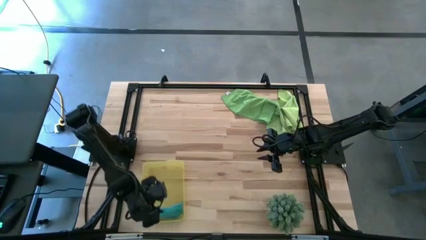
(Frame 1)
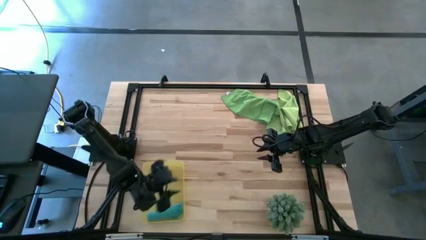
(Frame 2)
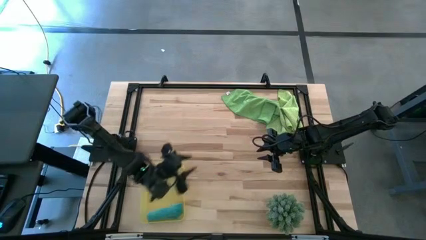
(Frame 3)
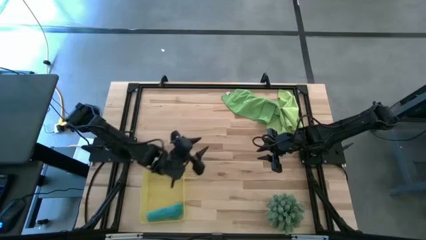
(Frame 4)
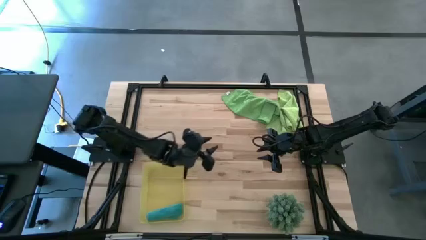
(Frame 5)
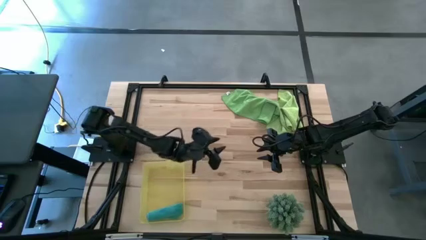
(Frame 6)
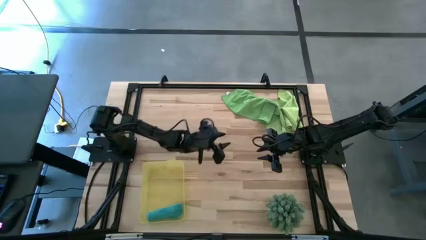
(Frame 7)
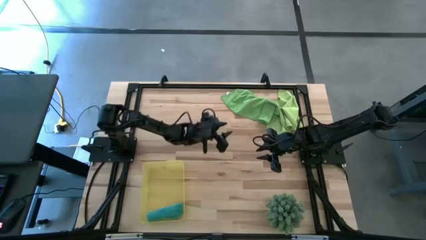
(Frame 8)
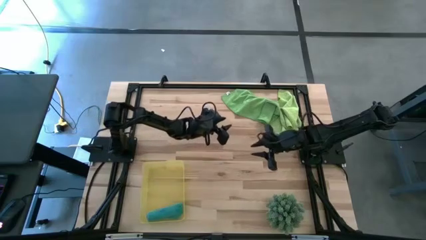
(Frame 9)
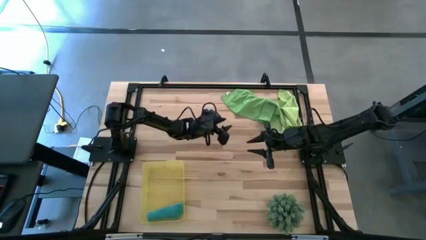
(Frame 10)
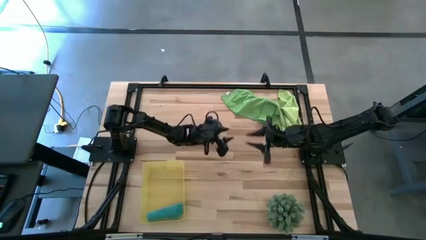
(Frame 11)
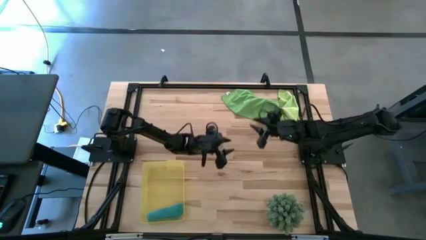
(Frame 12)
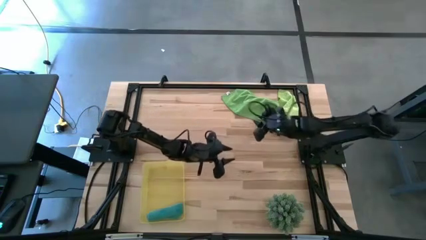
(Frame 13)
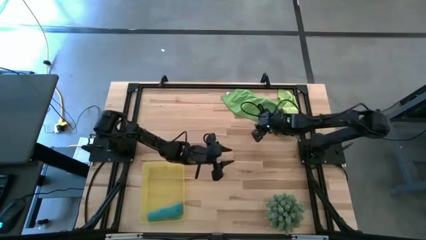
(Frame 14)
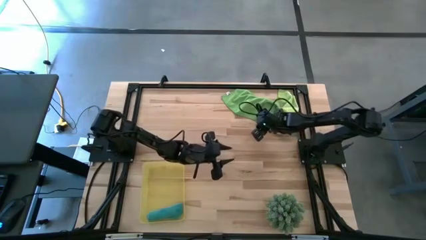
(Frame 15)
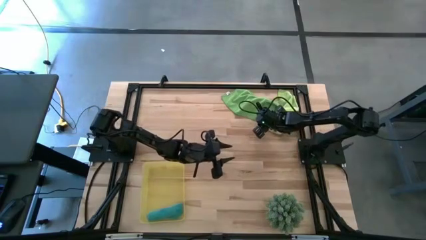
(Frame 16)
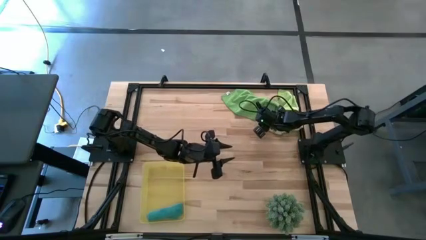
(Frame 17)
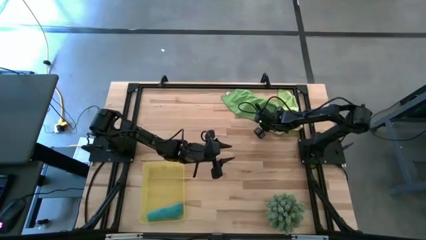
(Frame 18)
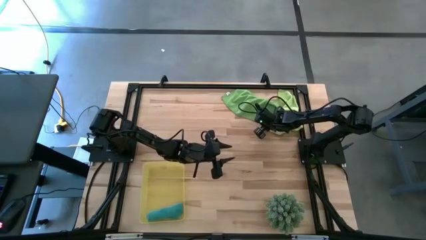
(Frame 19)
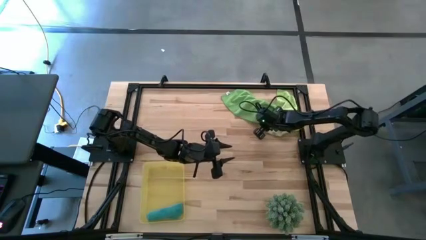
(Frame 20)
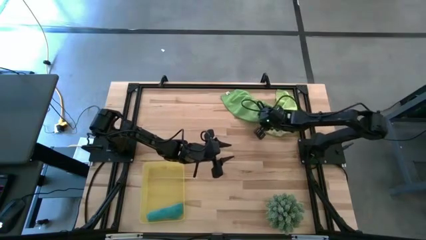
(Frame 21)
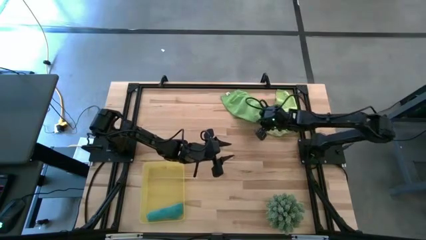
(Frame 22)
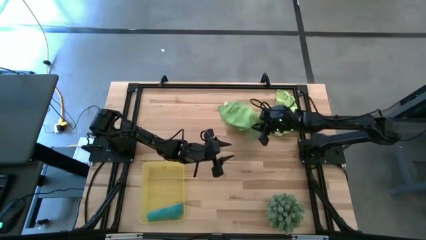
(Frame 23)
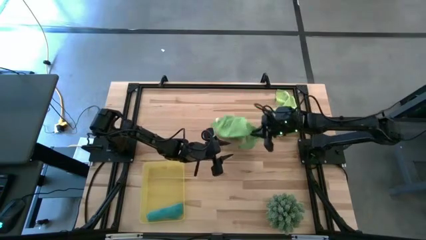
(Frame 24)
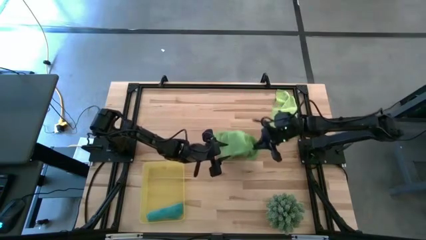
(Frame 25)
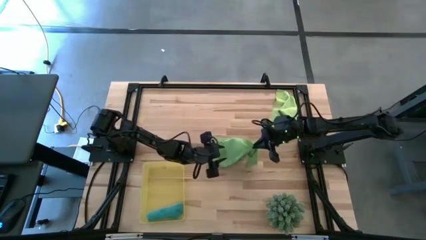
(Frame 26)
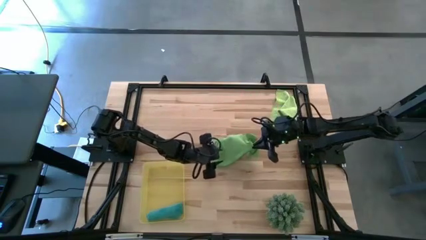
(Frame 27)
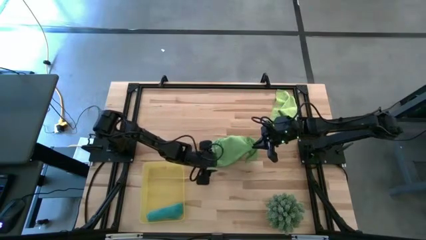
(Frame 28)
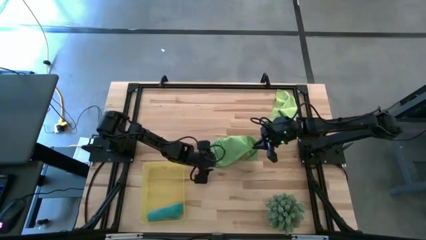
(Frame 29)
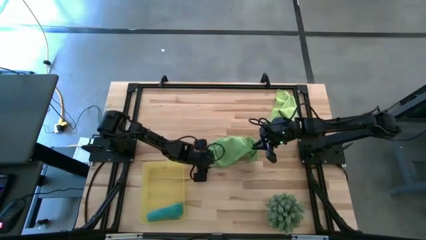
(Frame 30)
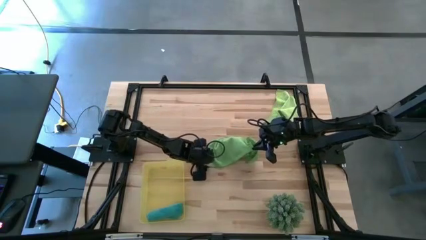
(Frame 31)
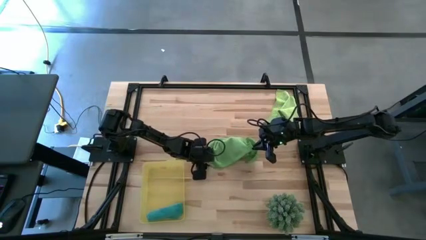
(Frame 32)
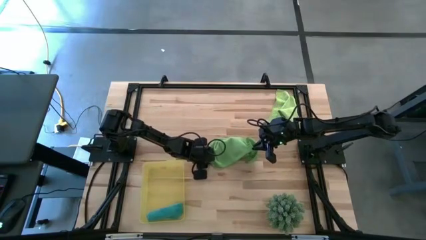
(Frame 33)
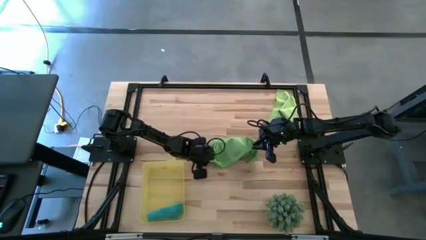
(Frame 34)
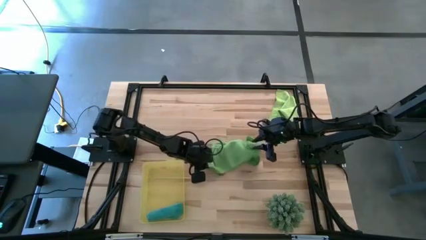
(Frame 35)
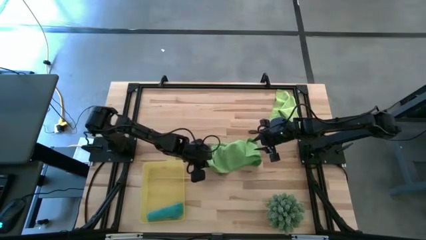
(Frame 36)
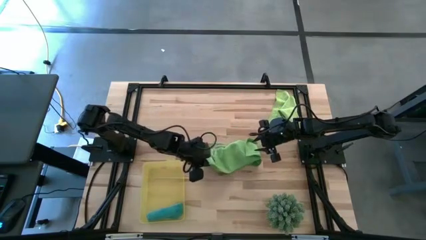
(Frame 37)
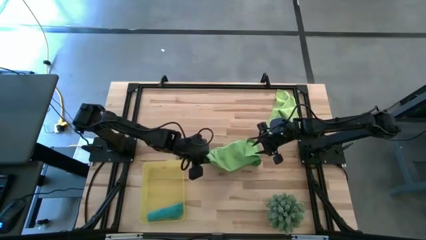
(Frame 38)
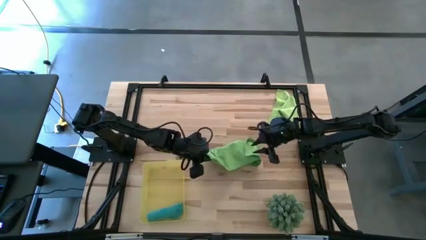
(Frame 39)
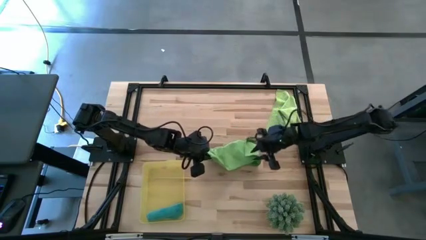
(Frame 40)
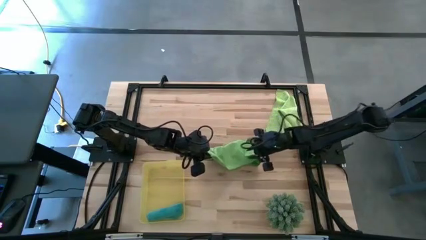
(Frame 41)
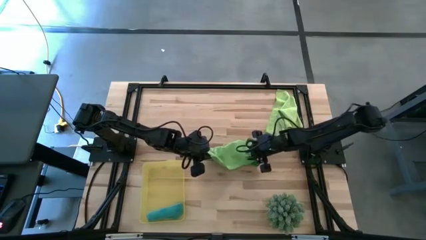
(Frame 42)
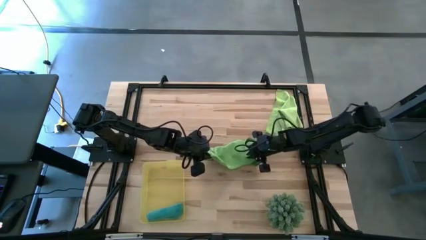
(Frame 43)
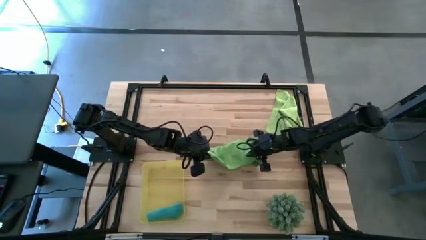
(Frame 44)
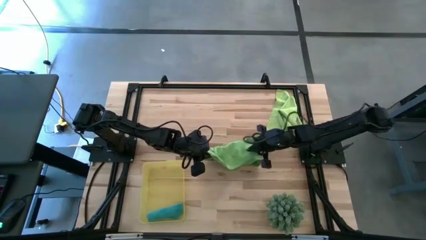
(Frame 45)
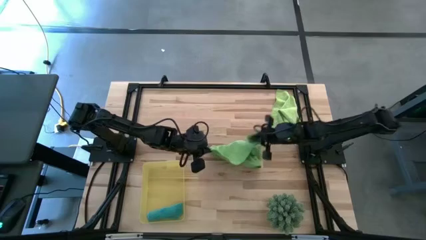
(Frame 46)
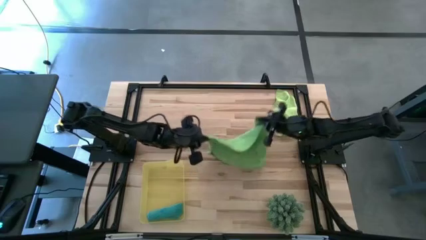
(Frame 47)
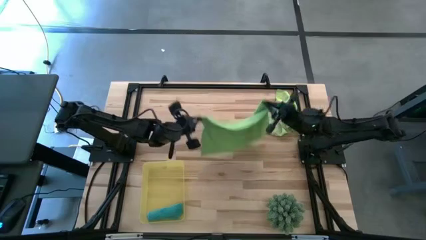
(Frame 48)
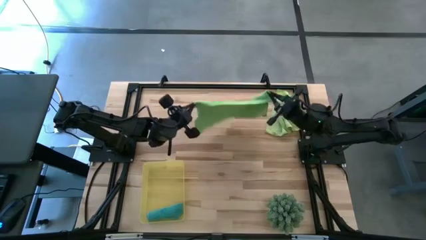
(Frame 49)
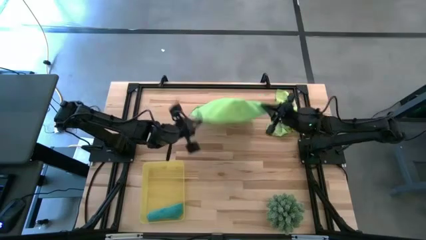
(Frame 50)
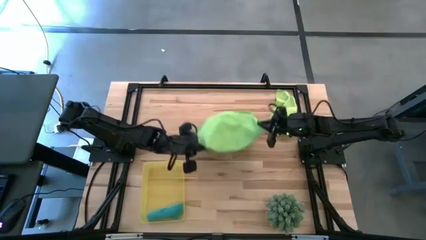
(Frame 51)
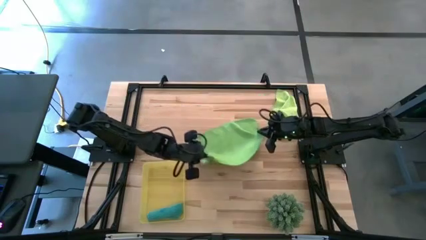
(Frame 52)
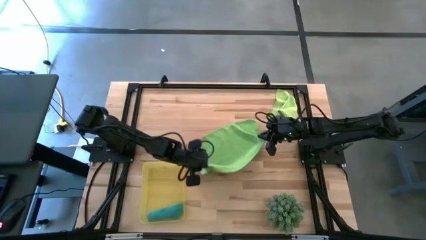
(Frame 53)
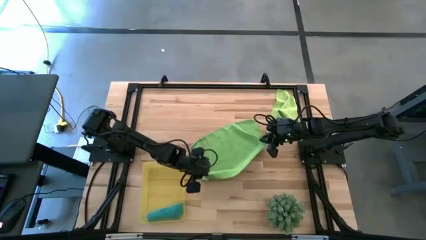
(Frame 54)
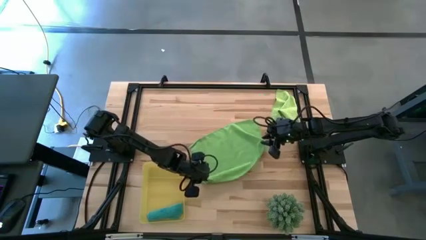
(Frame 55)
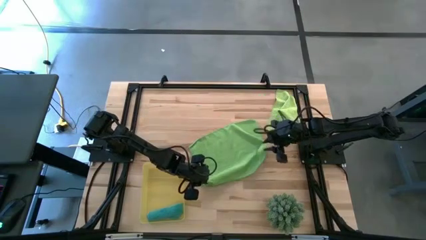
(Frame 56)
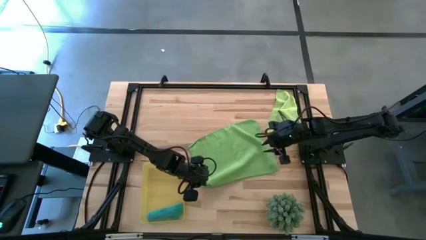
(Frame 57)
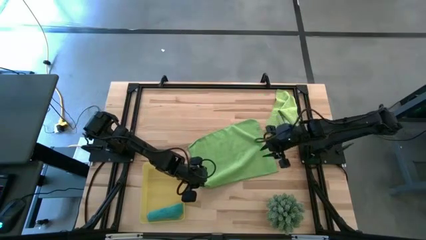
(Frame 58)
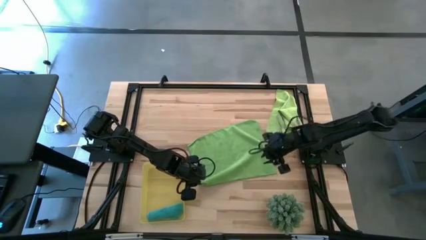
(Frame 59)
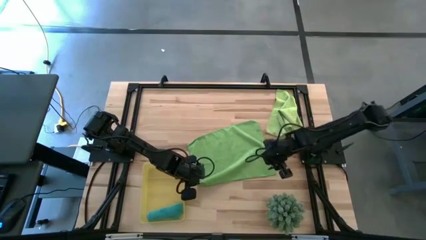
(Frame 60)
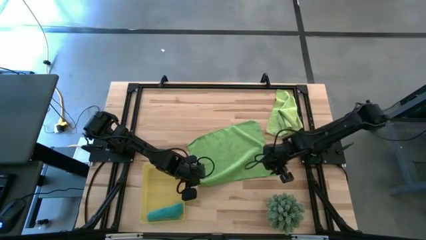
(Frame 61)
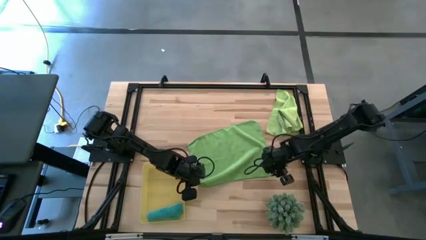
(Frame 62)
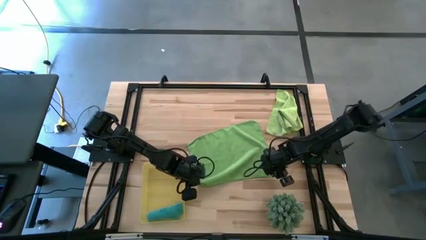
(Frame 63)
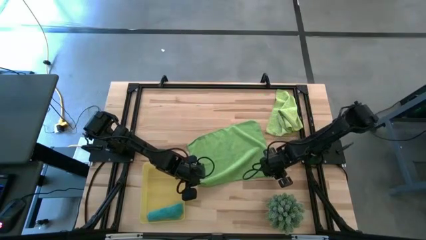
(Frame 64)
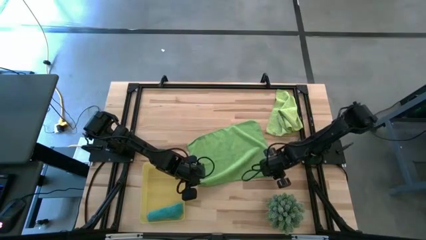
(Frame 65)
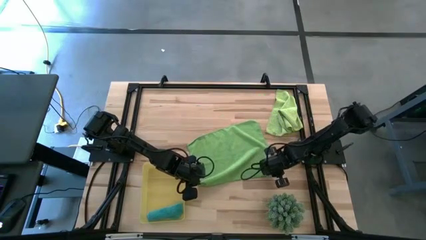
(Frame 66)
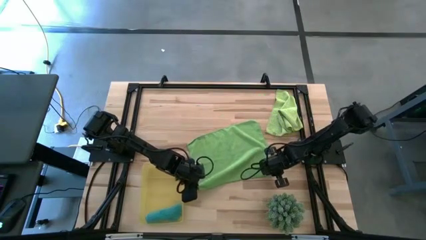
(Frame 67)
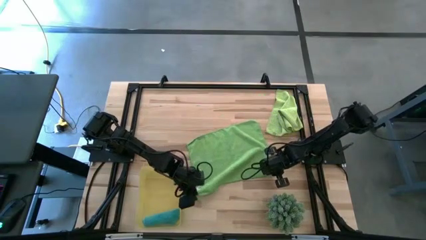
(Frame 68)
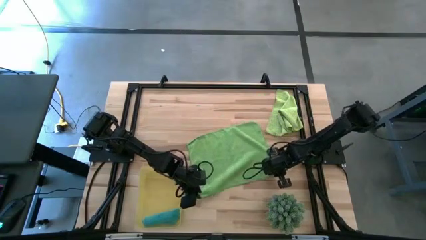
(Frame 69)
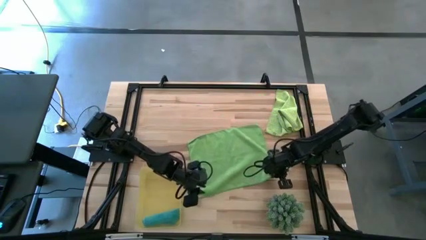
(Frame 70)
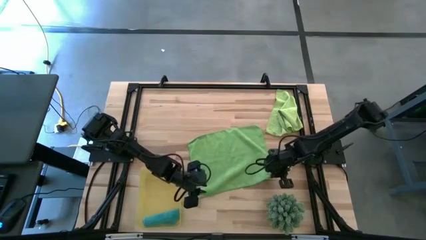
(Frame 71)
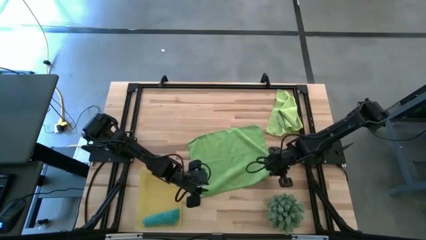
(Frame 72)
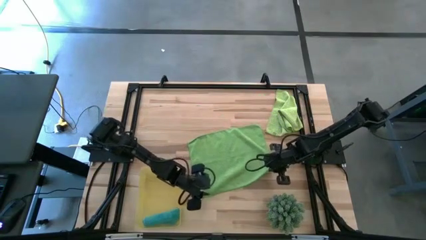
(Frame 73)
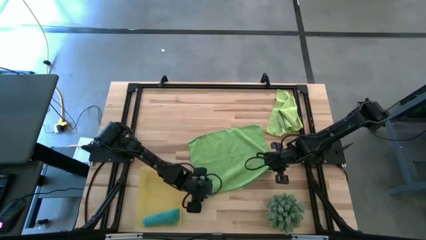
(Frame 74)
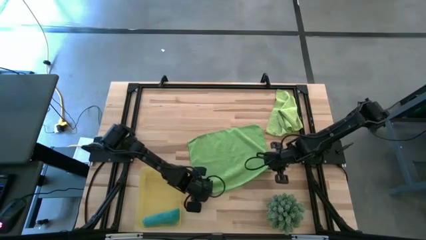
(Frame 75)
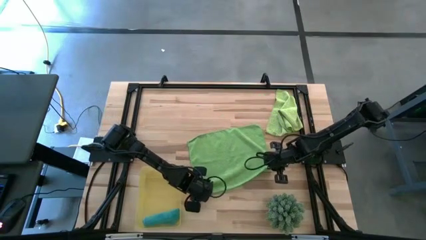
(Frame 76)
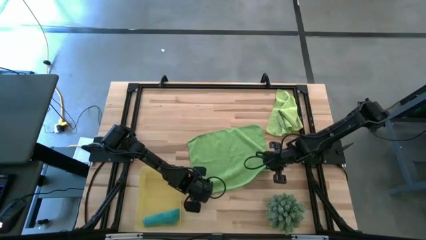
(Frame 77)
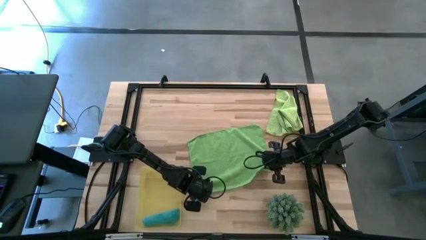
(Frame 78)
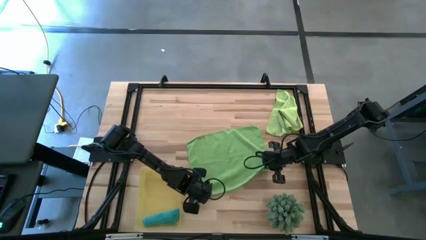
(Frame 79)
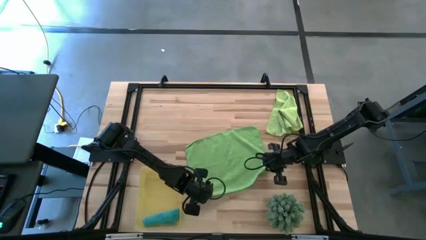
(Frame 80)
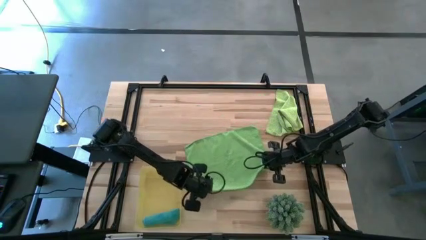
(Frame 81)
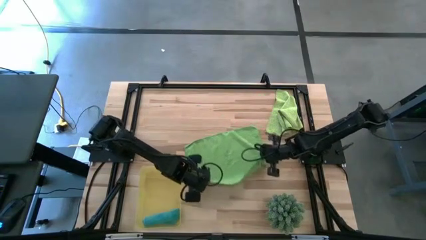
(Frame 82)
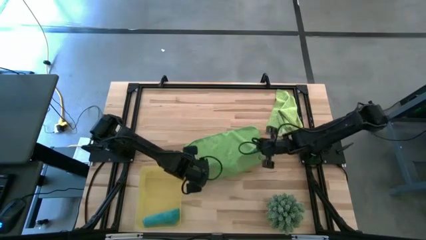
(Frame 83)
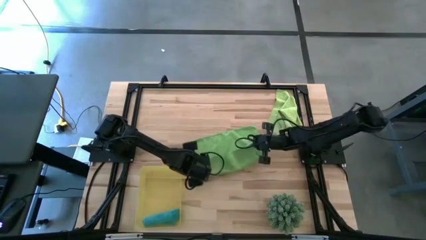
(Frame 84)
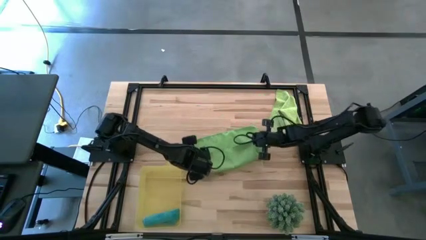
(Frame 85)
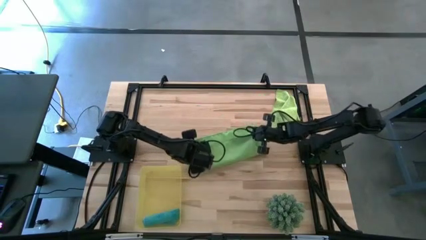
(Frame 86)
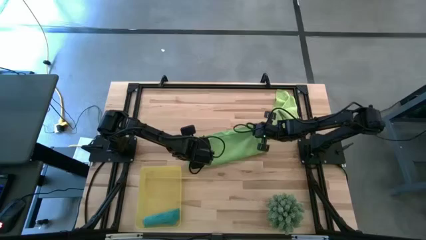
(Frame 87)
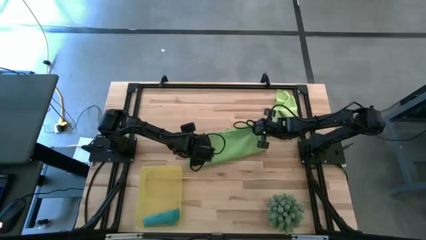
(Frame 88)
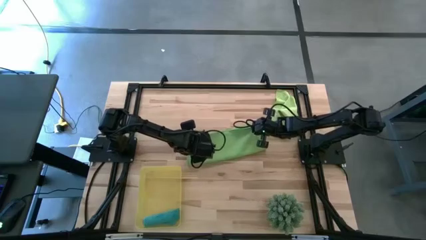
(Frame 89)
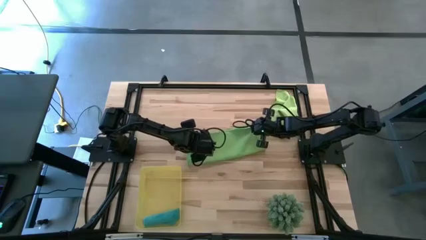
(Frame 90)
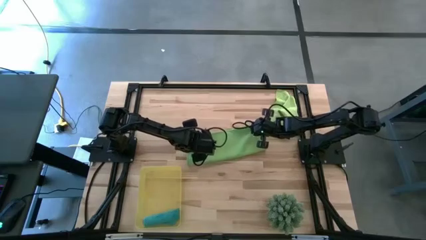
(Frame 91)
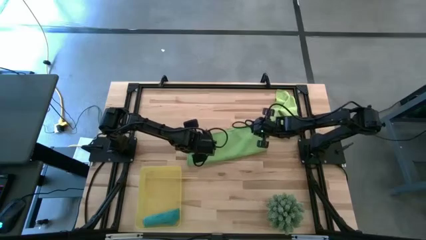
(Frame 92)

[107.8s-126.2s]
Task: Roll microfiber towels into tight, uniform cylinder then place into a basket
Roll the green microfiber towel
